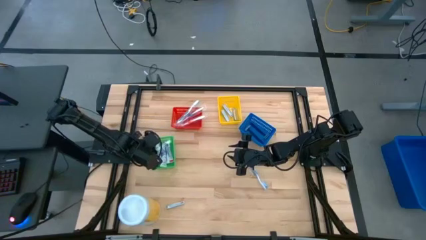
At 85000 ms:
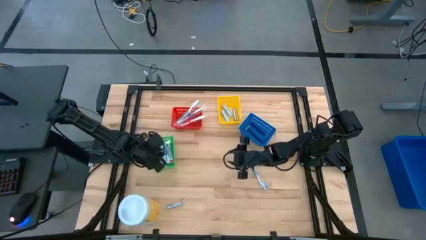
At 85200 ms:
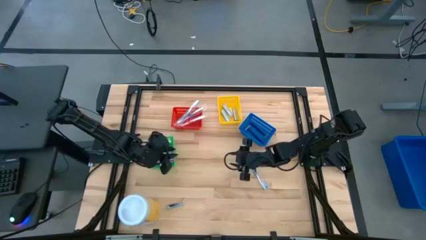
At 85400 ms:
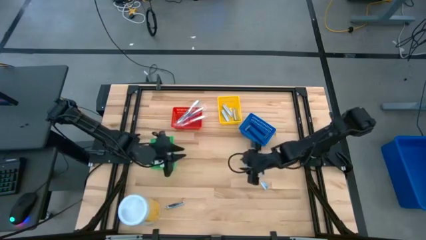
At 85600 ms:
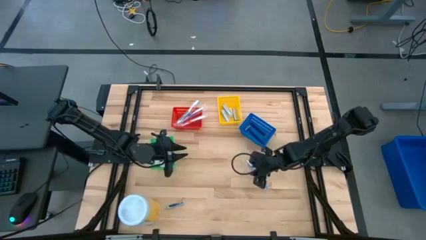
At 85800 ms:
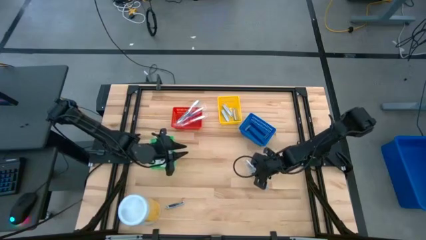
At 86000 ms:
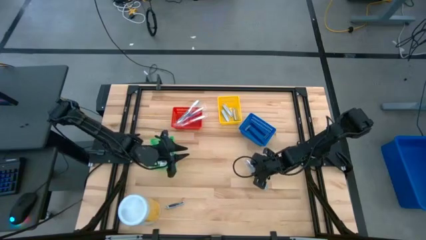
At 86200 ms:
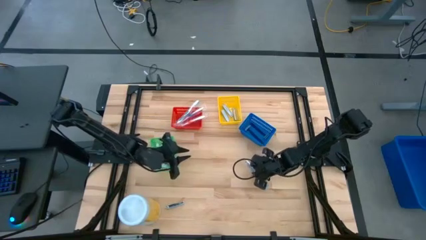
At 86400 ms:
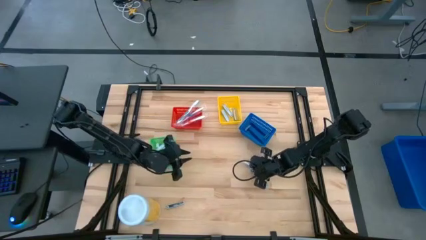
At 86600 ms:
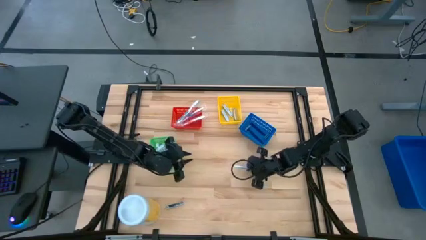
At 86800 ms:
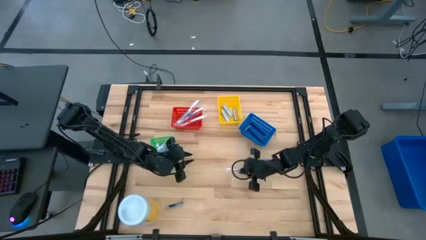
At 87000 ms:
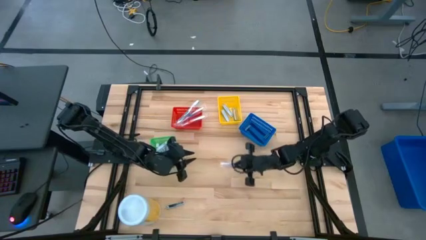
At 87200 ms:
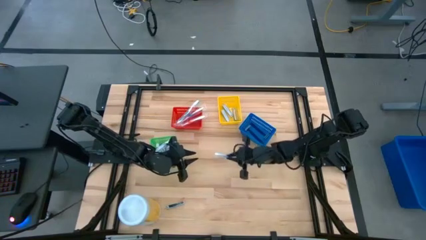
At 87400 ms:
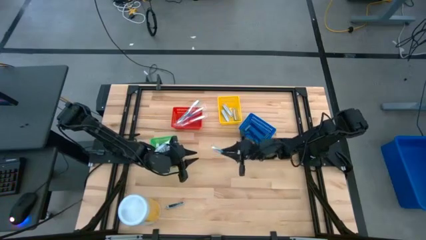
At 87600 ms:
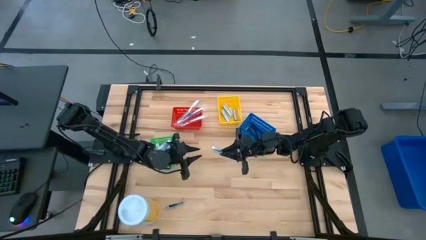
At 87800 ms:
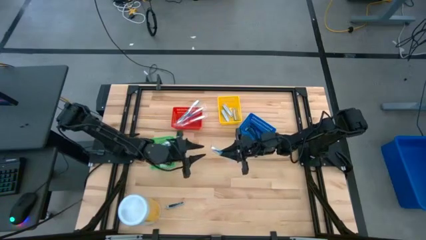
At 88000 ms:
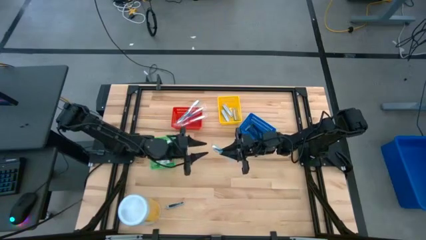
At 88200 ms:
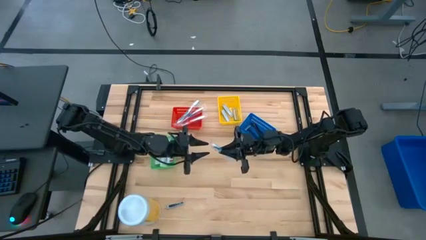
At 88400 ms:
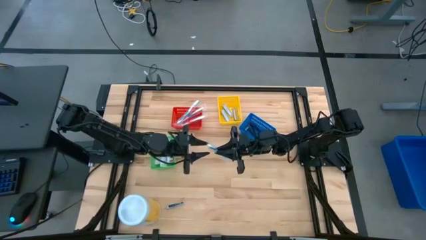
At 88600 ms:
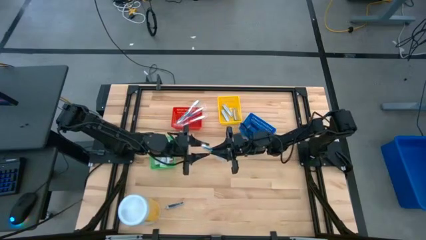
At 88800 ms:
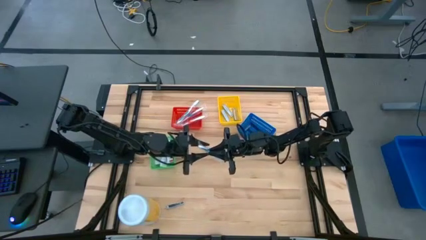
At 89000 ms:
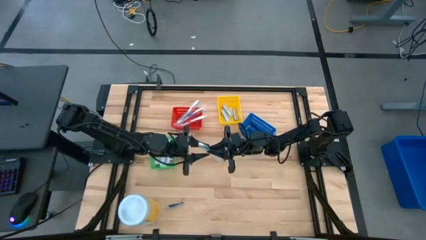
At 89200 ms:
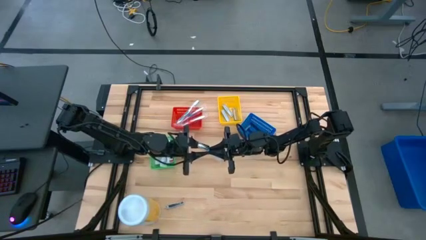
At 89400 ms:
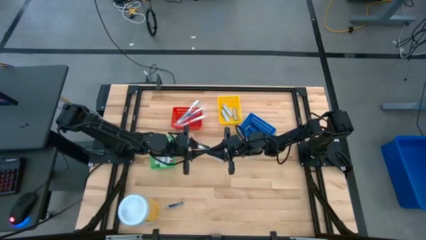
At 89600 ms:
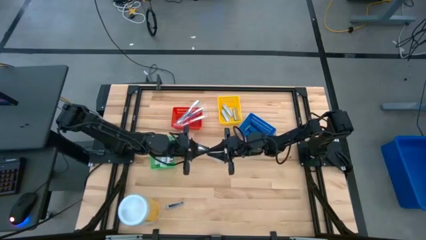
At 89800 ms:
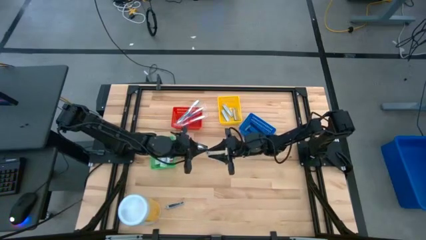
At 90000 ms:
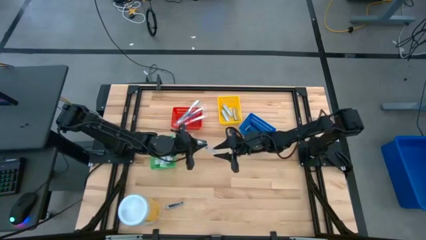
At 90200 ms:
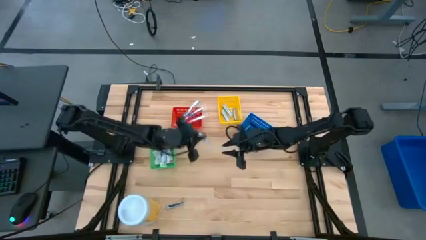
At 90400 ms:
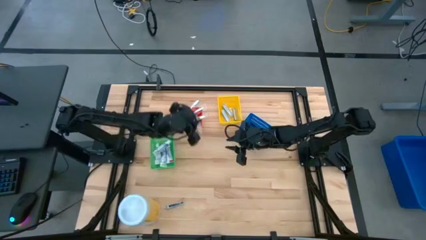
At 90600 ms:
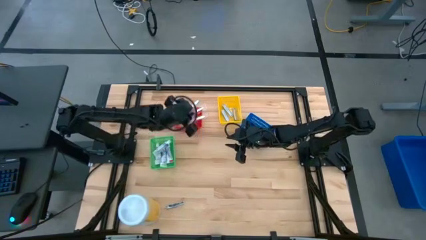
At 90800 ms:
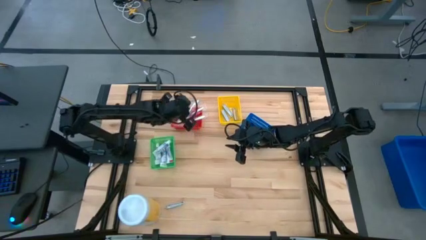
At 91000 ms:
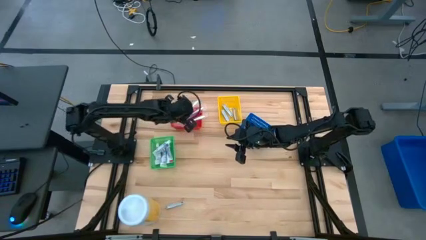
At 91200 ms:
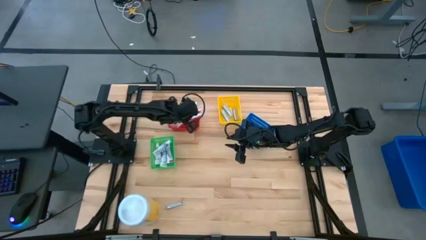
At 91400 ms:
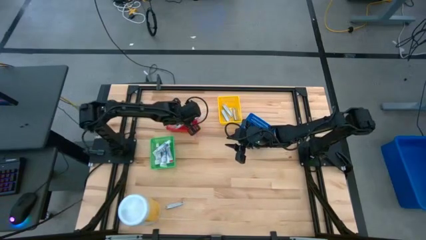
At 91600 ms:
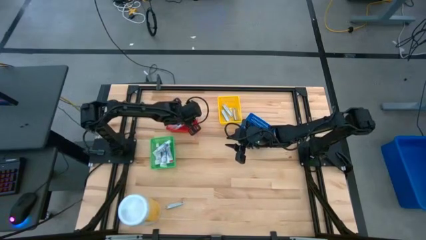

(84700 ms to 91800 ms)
Task: Pick & Place Travel size toiletries
Put the blue toothbrush into the red bin

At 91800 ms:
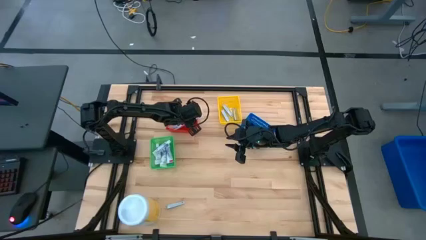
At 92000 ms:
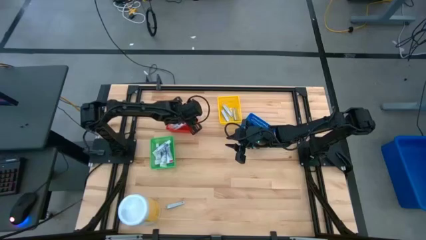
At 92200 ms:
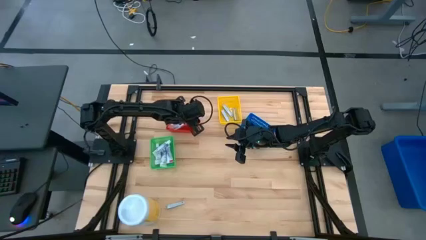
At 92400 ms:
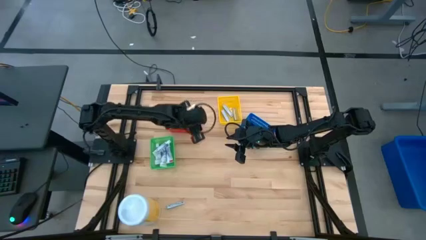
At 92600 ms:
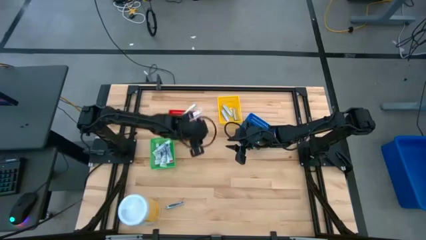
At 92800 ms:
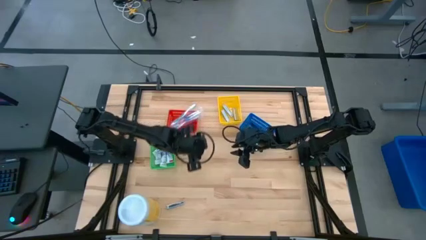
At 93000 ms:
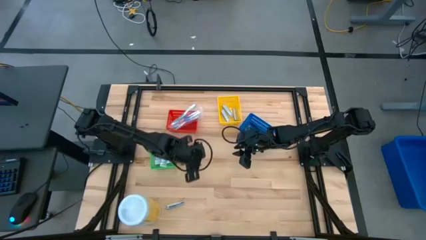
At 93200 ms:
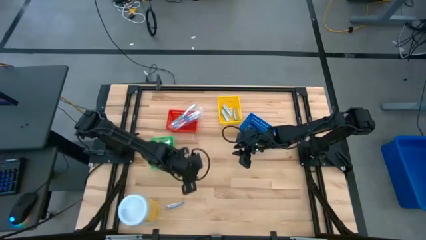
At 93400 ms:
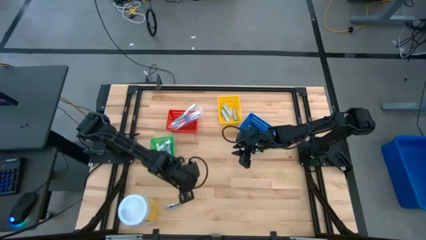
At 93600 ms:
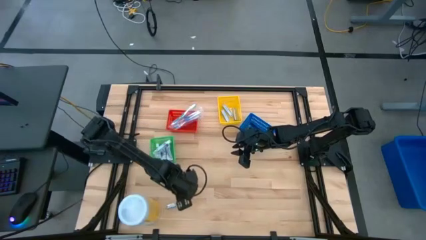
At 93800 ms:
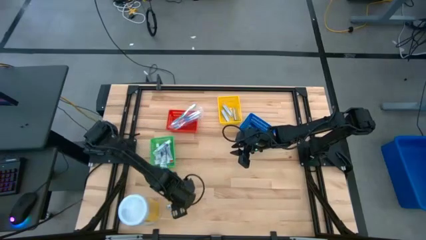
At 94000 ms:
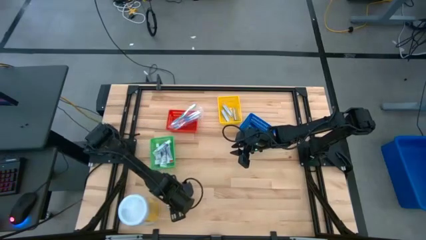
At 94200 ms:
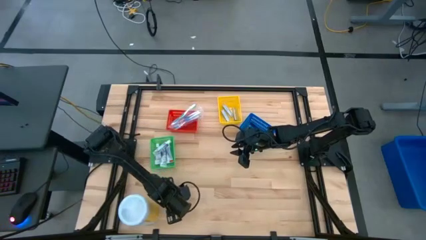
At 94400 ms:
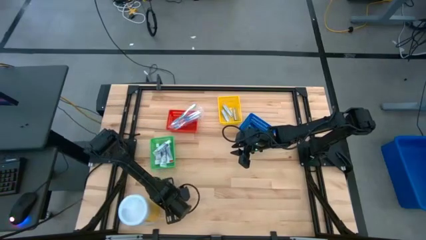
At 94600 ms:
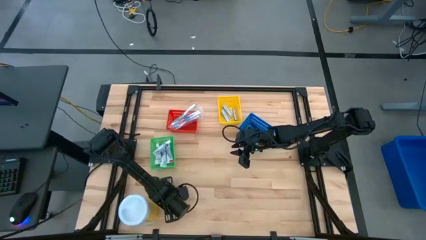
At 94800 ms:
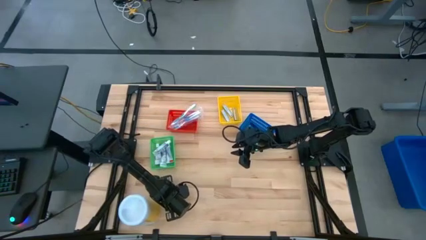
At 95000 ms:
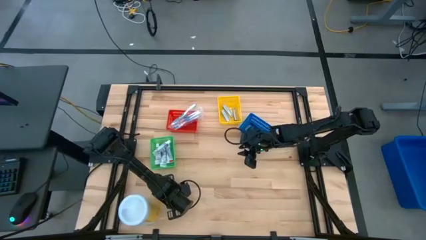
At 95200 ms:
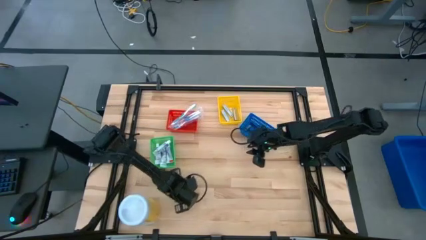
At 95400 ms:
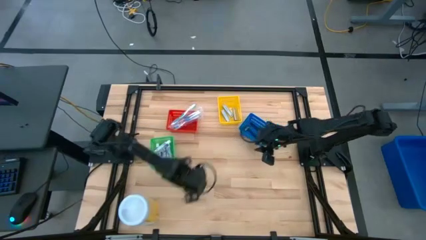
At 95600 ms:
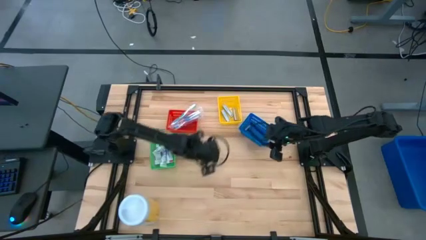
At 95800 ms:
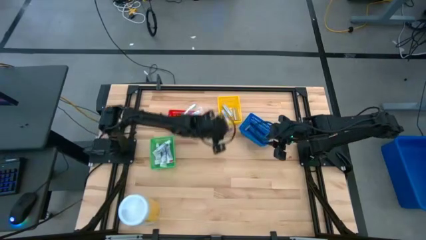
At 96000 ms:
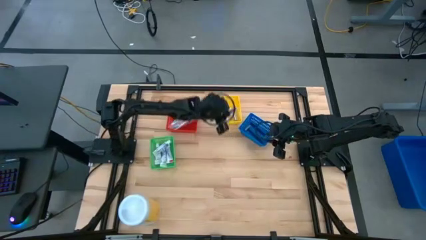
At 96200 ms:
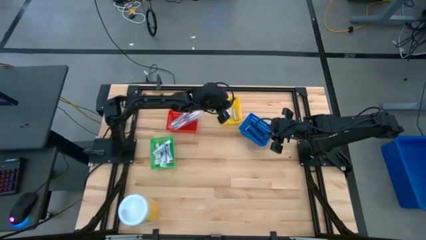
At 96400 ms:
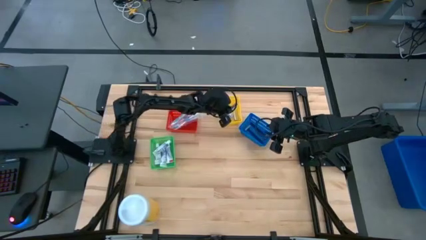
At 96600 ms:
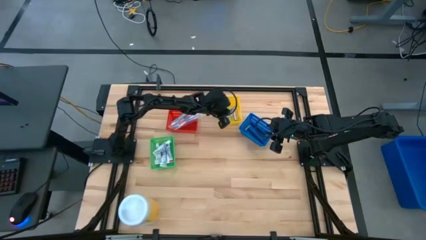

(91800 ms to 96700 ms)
Put the silver nail cutter into the blue bin

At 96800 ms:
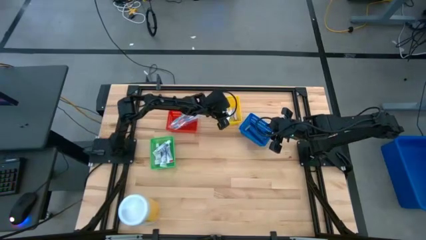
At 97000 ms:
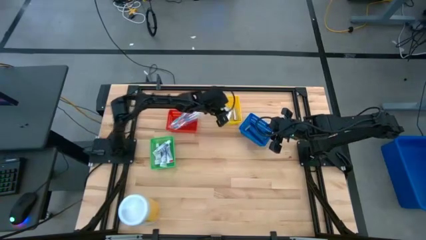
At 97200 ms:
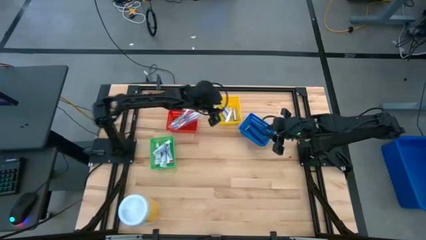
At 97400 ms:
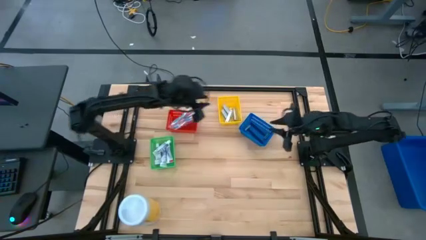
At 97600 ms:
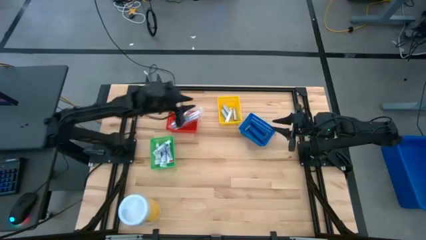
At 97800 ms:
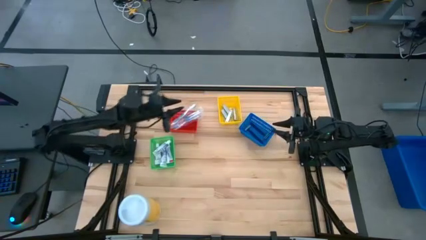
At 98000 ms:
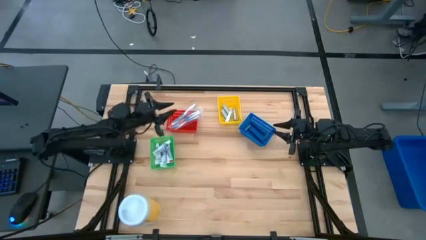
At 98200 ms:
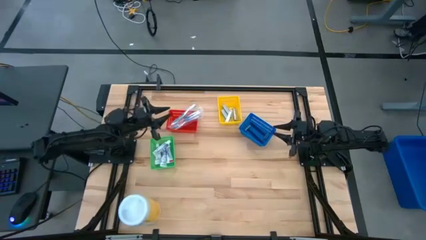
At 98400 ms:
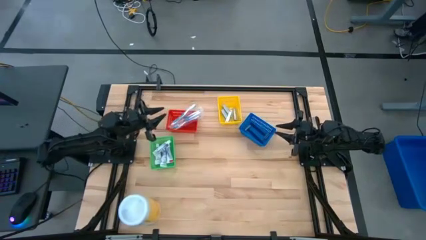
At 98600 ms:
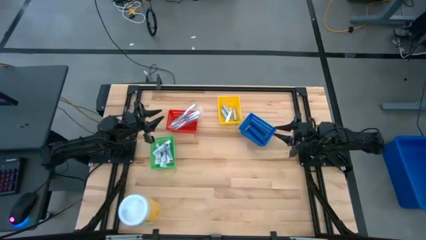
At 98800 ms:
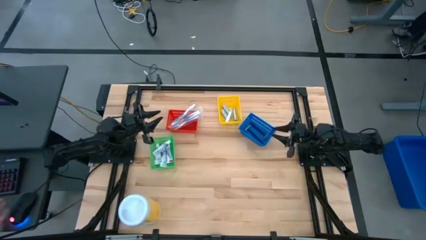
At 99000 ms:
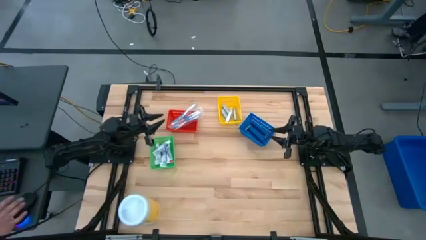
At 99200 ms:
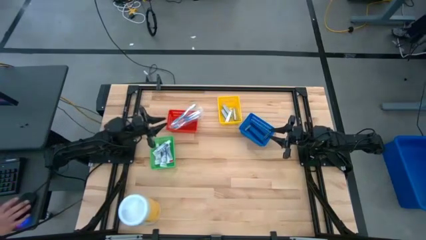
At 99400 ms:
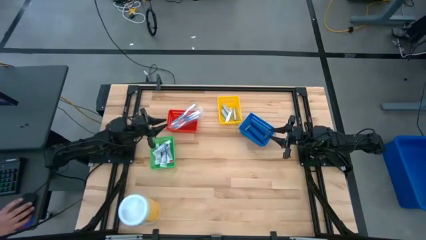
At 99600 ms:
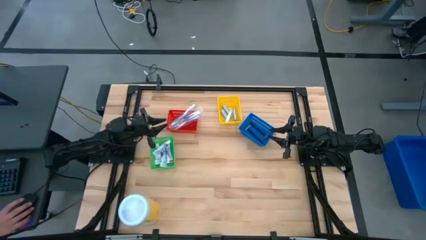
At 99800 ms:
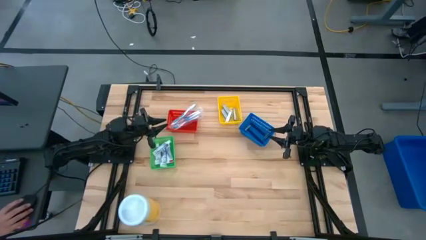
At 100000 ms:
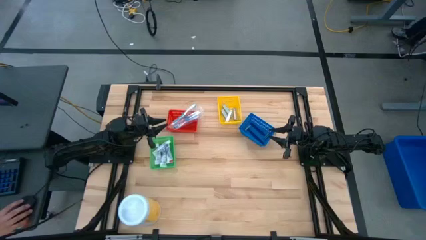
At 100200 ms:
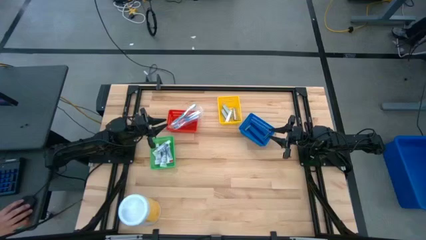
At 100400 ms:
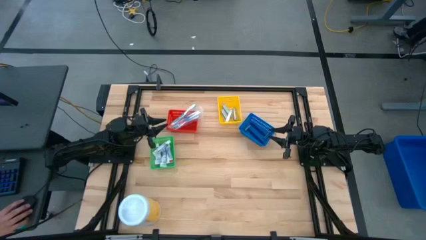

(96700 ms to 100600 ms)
Return to Home Position
